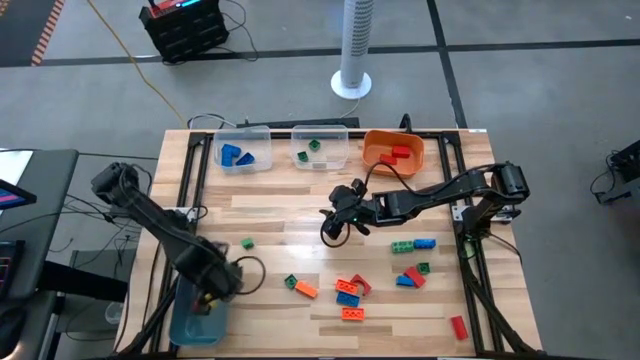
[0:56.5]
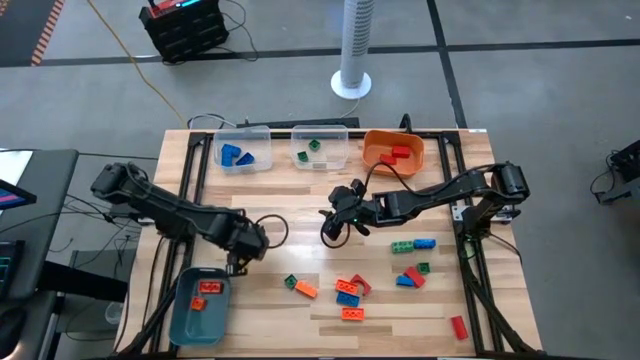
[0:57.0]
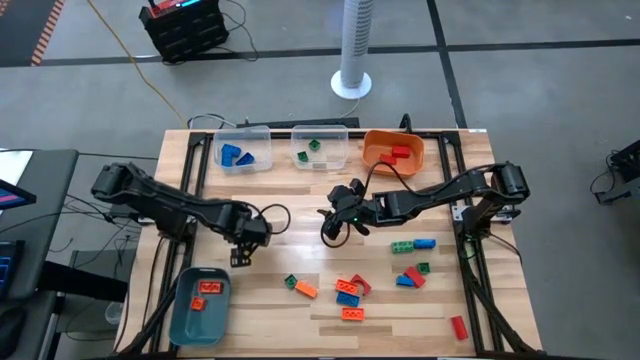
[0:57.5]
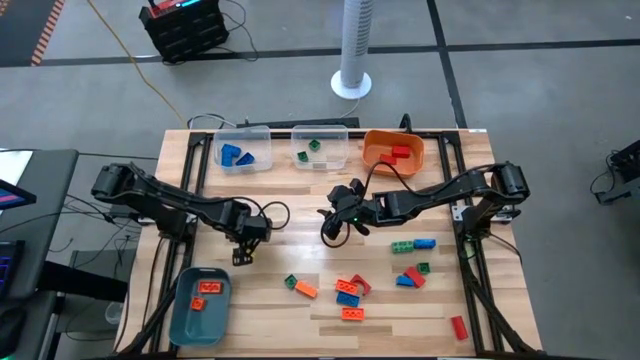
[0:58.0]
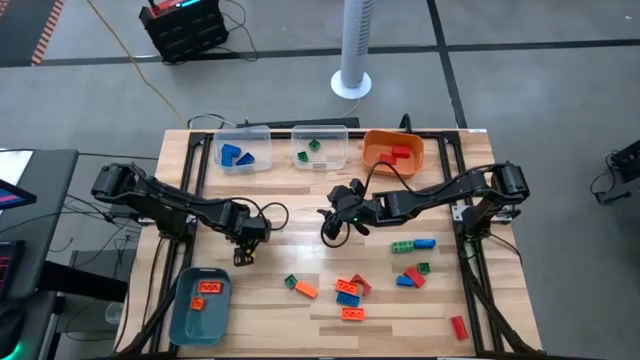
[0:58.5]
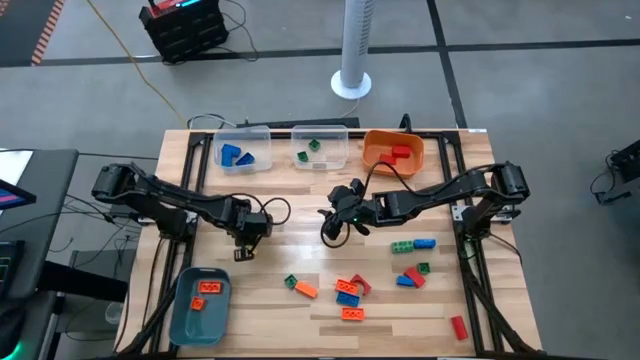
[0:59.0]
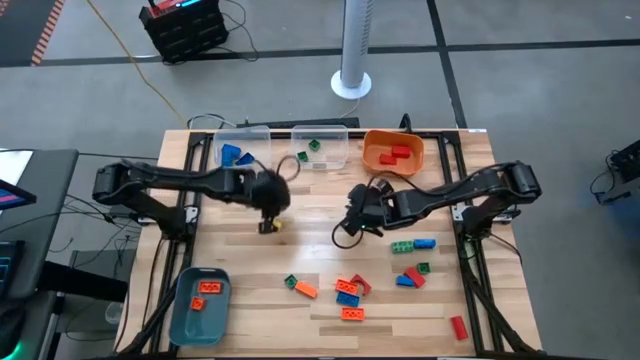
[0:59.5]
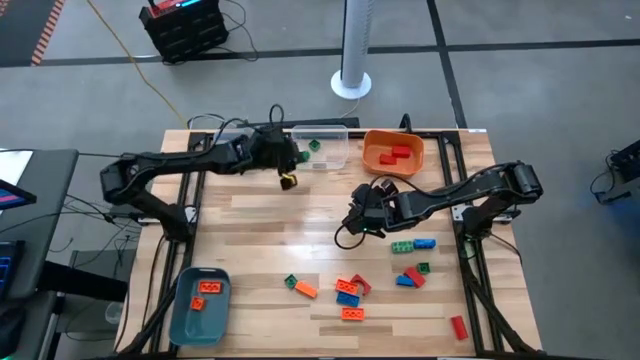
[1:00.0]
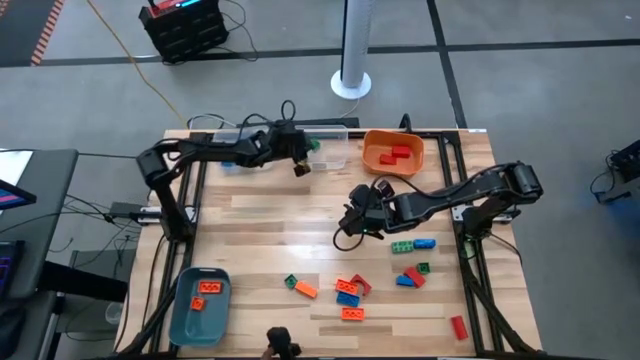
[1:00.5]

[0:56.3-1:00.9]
Task: Sort blocks
Put the green game piece into the right transparent bin

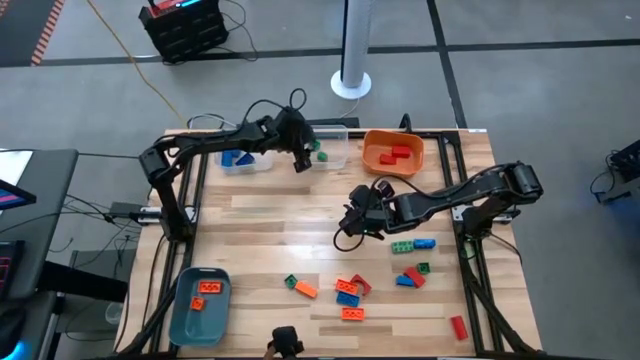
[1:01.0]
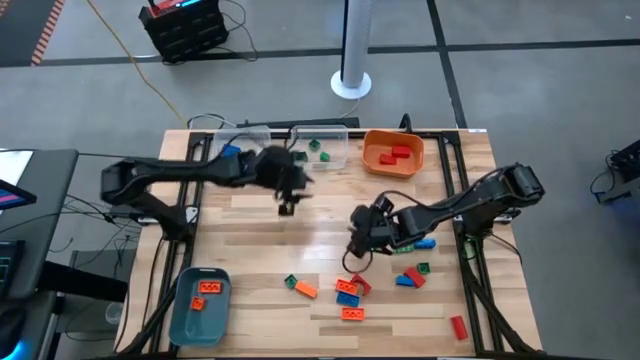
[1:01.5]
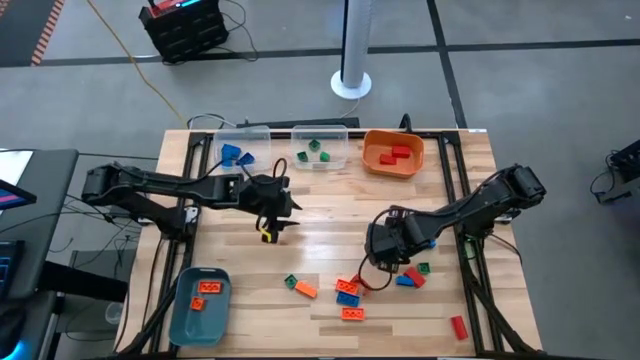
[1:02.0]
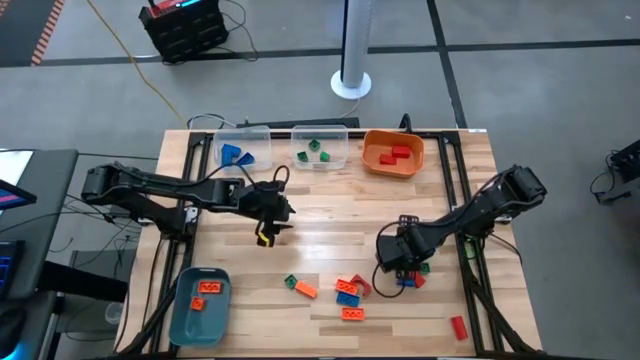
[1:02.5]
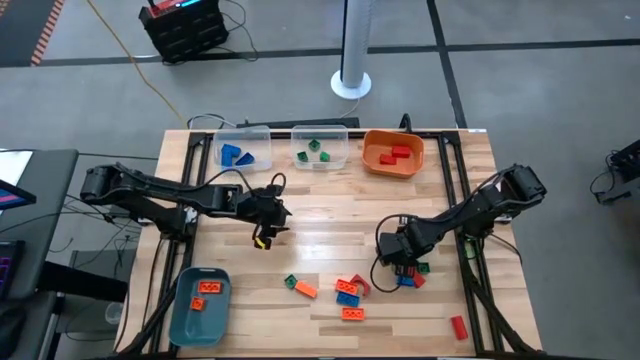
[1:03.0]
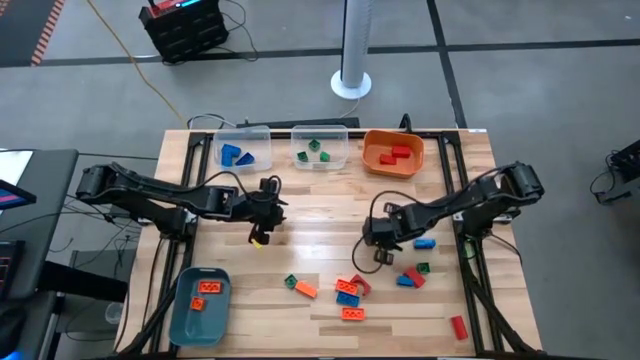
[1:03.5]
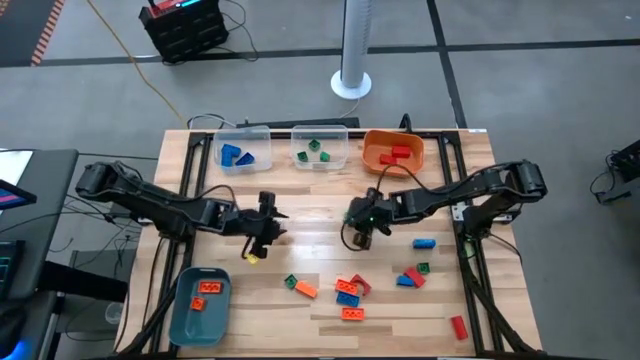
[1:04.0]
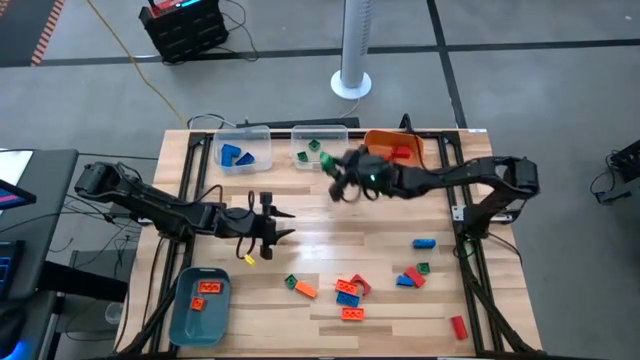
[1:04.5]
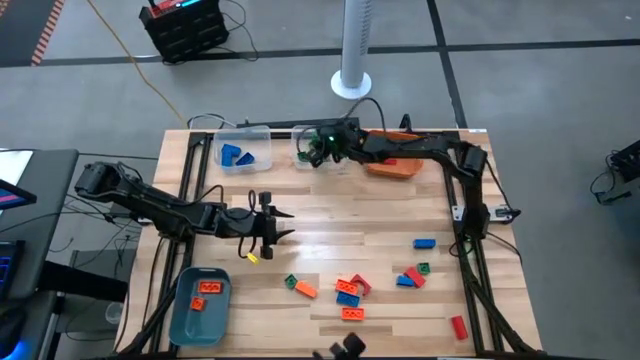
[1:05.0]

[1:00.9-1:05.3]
Put the green game piece into the right transparent bin

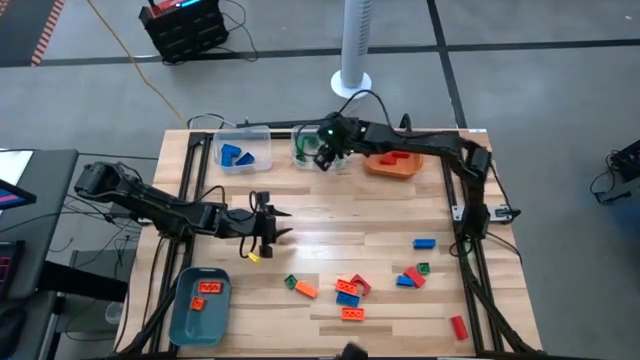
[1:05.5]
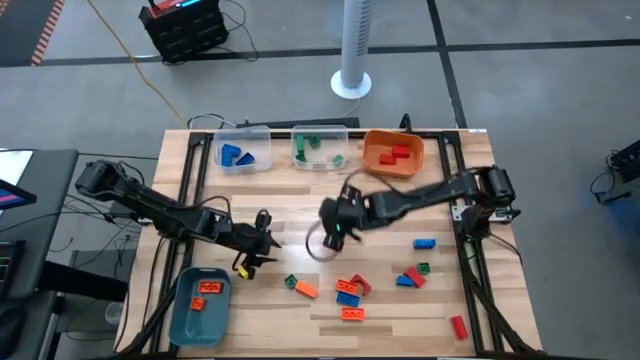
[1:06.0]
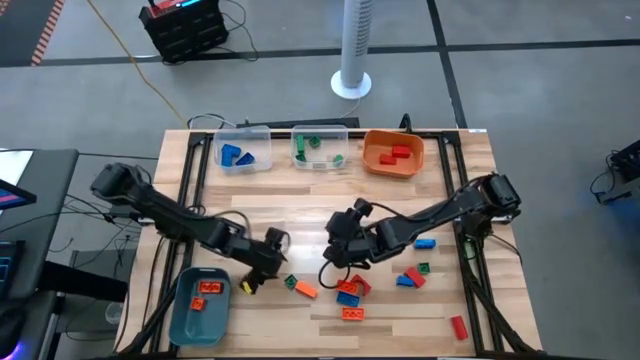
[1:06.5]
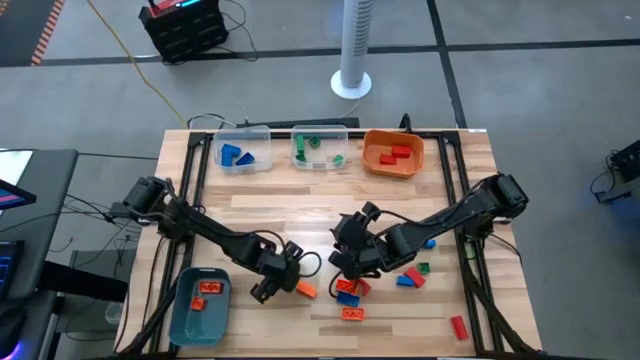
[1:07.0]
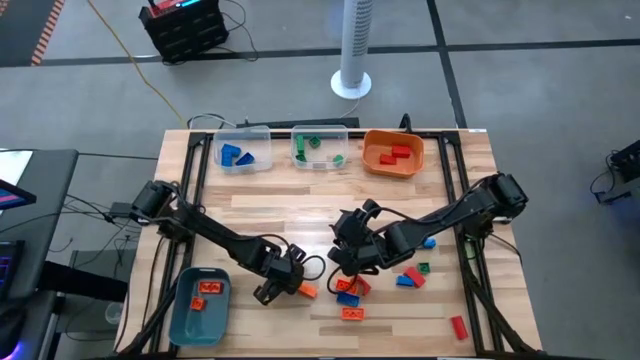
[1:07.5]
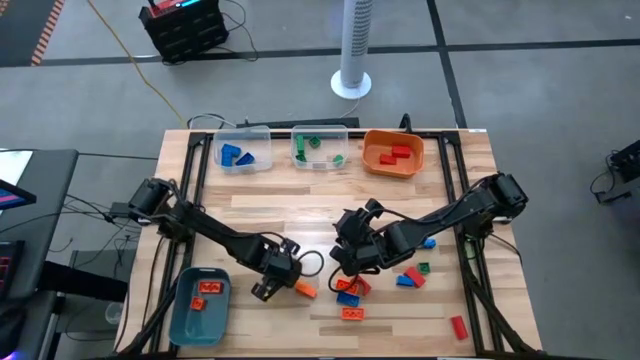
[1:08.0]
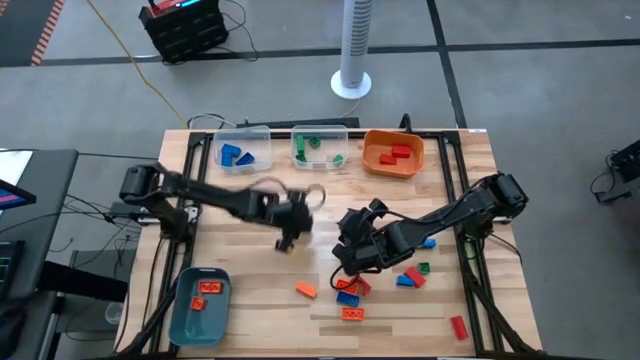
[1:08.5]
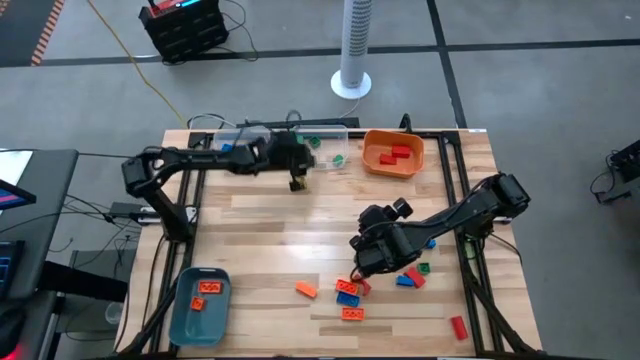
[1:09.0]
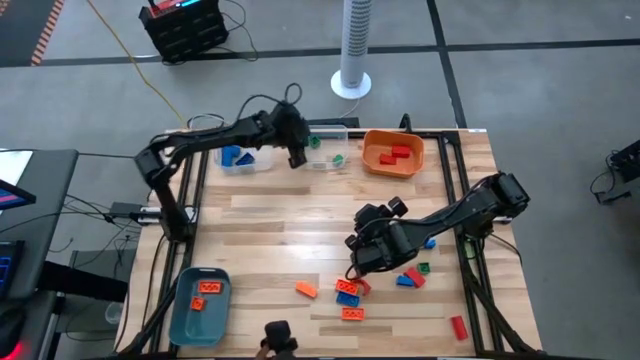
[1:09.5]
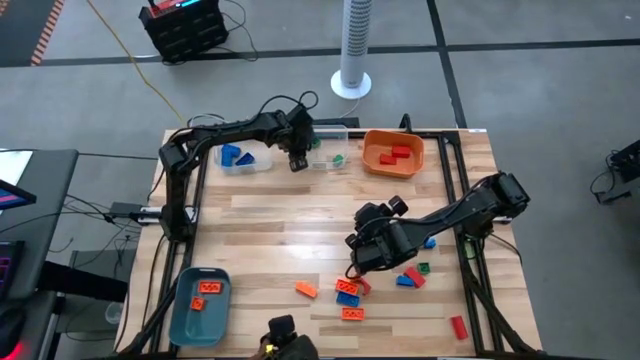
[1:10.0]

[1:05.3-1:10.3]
Put the green game piece into the right transparent bin

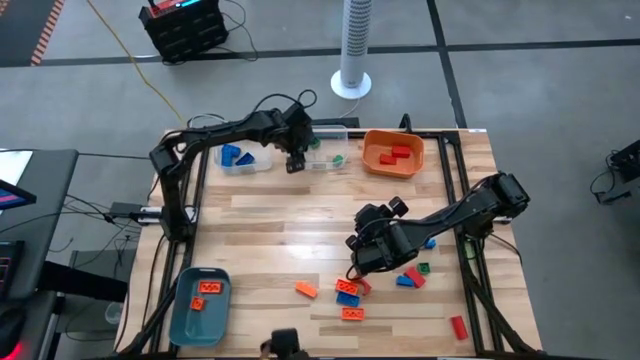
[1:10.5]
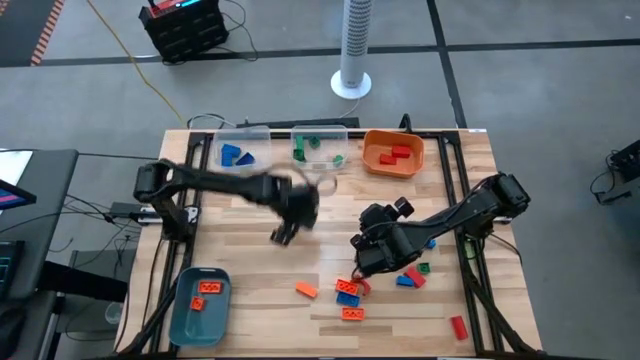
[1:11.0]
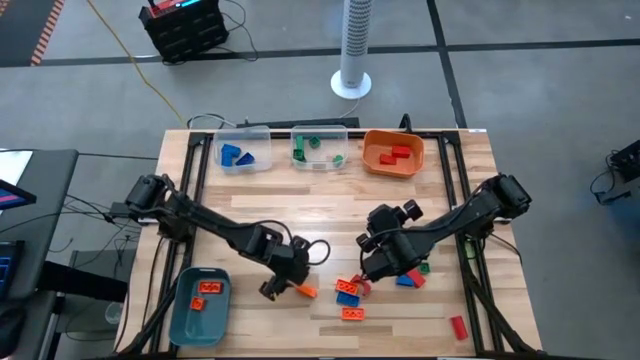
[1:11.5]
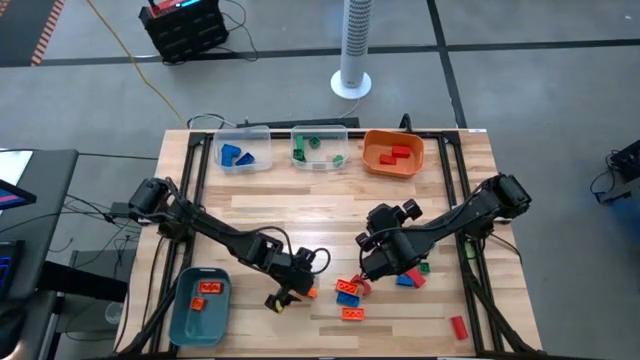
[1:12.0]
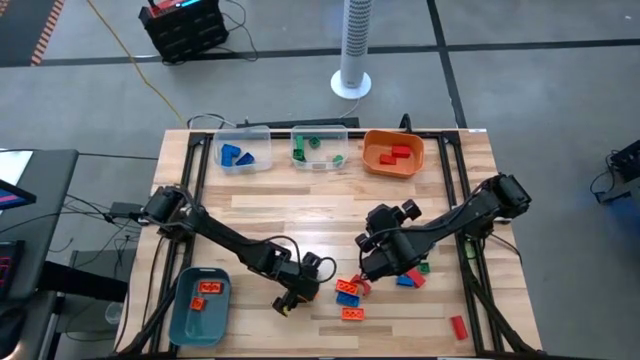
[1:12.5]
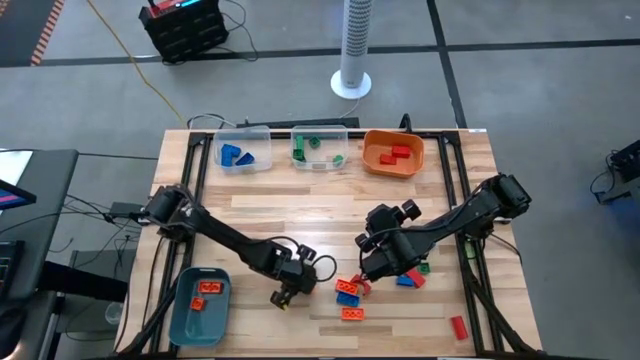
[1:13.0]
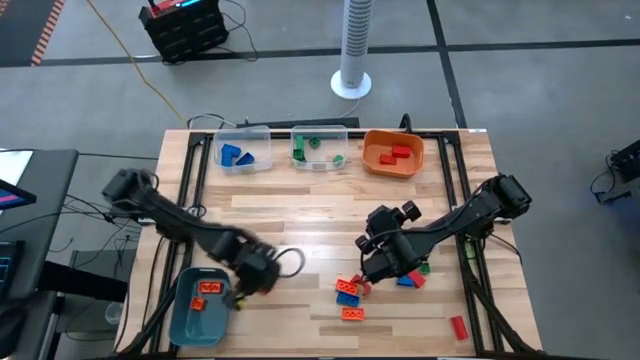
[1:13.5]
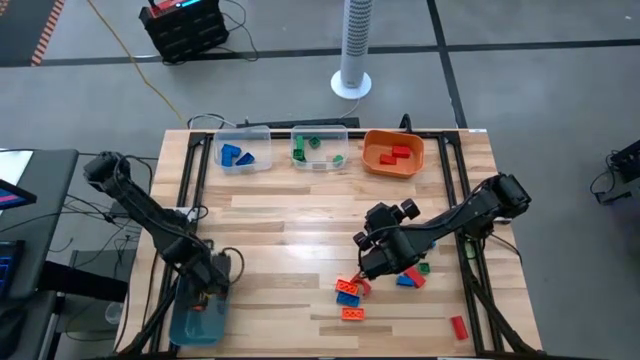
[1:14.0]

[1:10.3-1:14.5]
Put the orange game piece into the blue bin

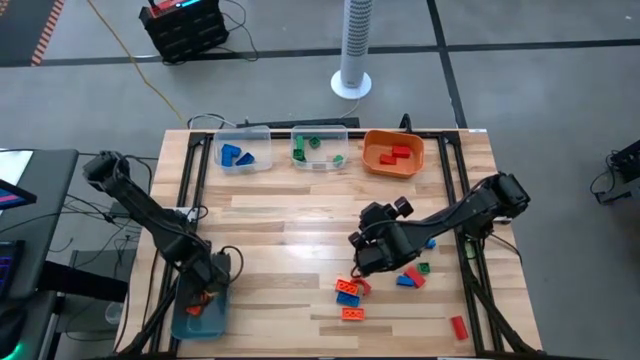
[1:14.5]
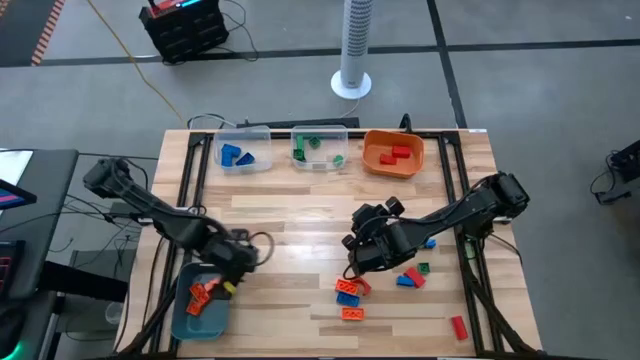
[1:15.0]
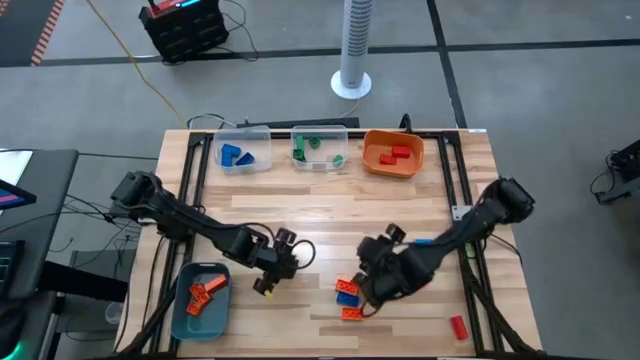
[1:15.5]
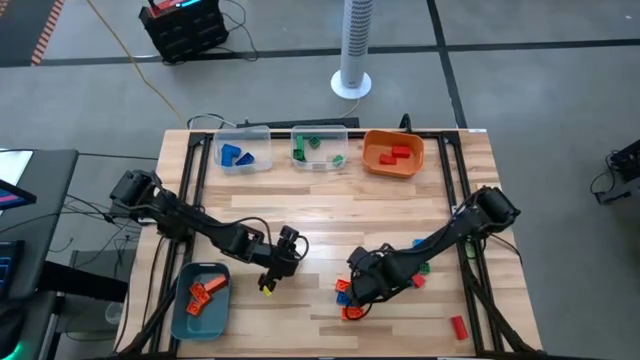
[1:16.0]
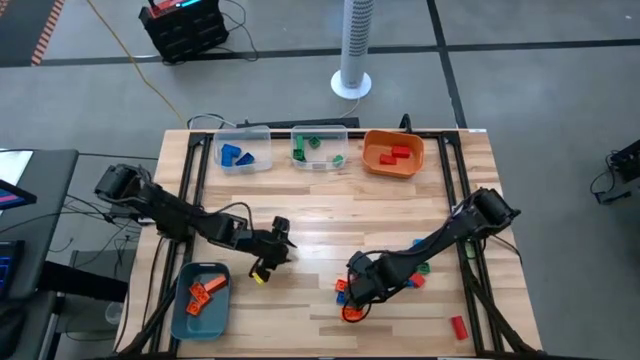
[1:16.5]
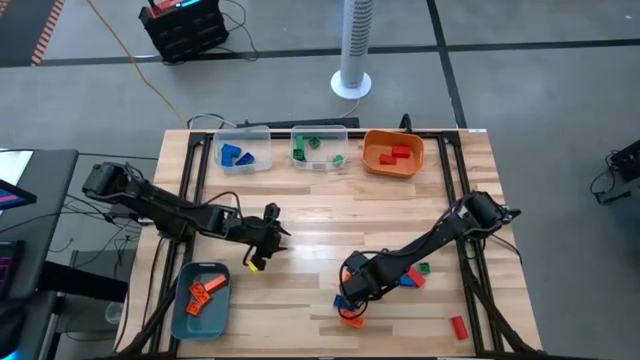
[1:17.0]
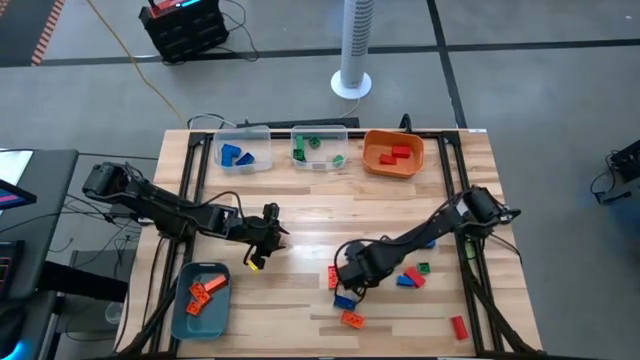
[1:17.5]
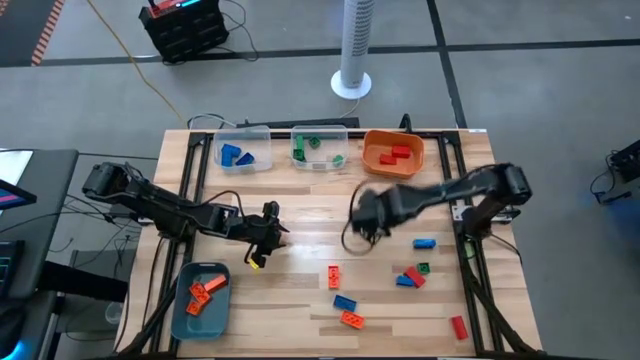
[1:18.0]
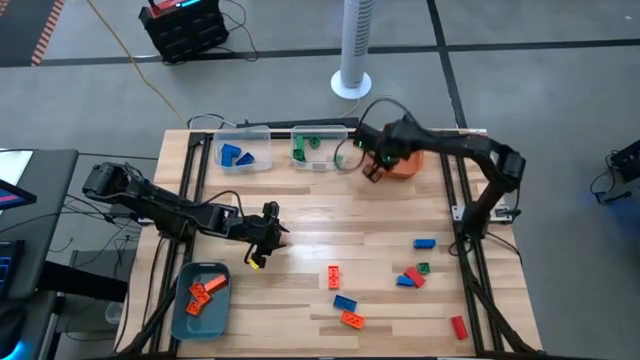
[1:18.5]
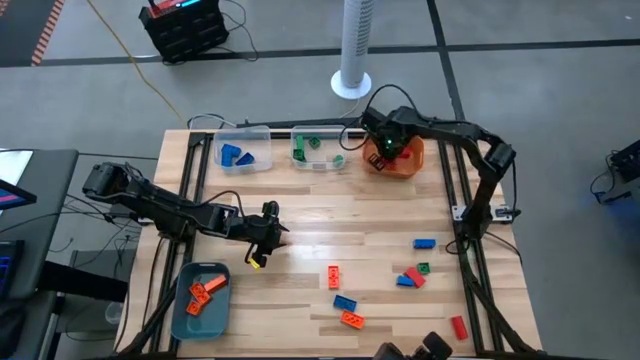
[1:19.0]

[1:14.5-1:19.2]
Put the red block into the orange bin
